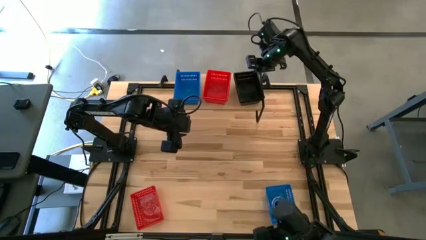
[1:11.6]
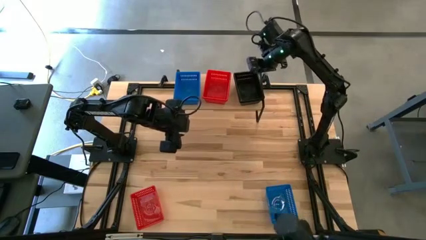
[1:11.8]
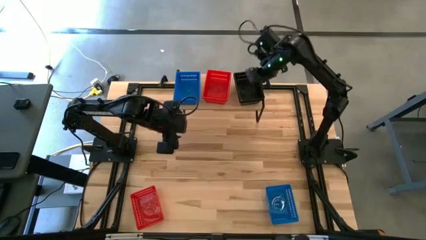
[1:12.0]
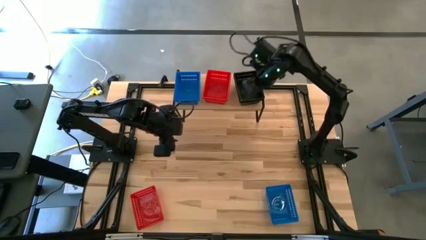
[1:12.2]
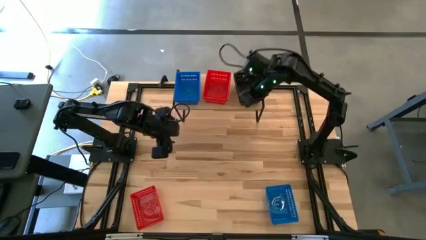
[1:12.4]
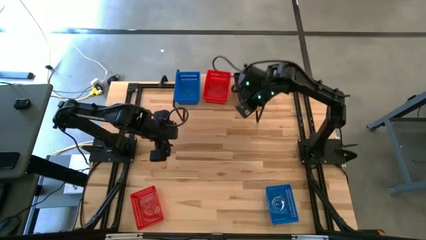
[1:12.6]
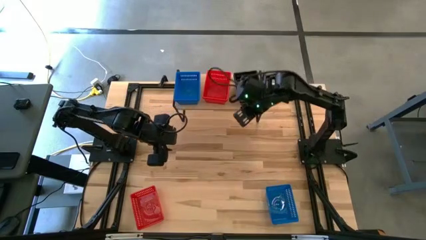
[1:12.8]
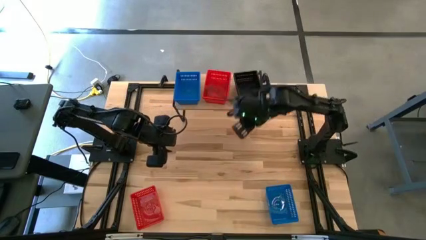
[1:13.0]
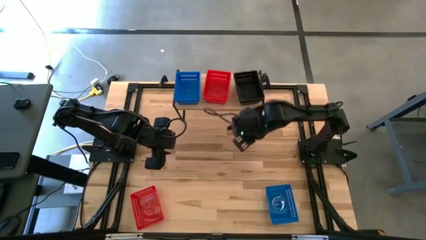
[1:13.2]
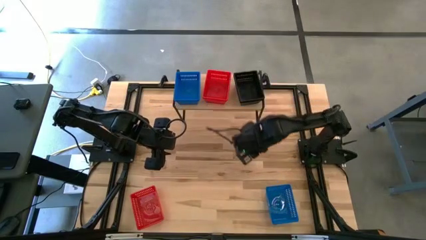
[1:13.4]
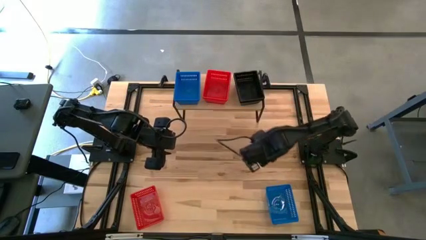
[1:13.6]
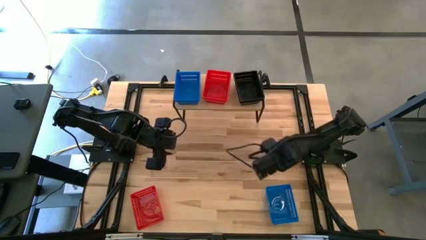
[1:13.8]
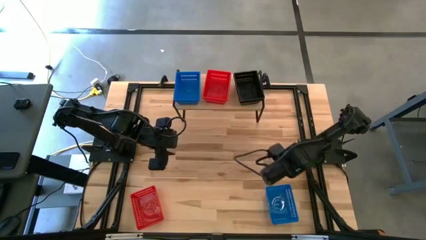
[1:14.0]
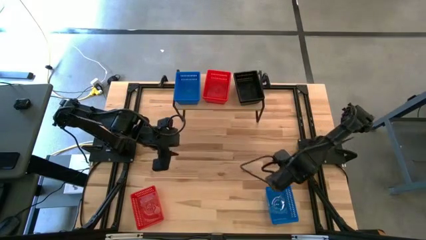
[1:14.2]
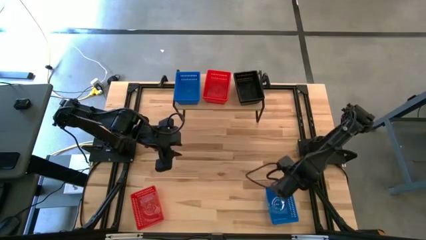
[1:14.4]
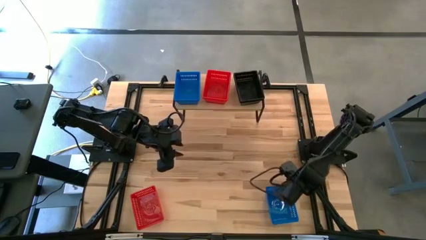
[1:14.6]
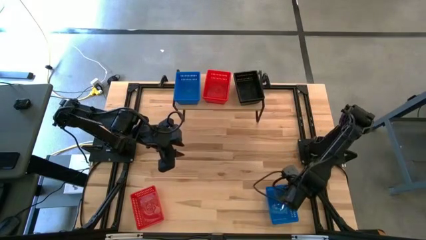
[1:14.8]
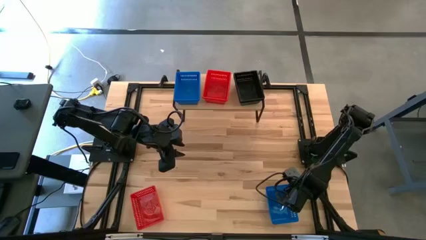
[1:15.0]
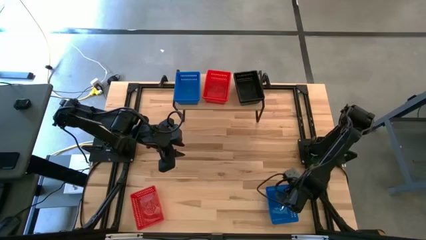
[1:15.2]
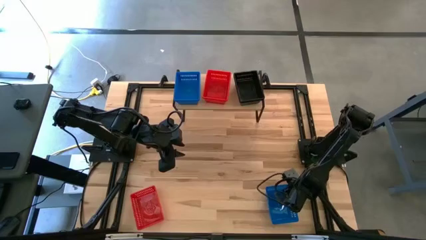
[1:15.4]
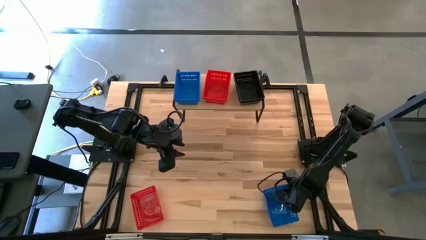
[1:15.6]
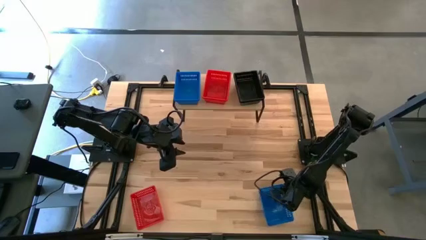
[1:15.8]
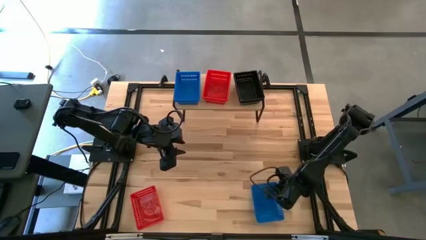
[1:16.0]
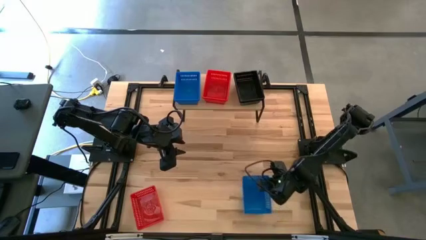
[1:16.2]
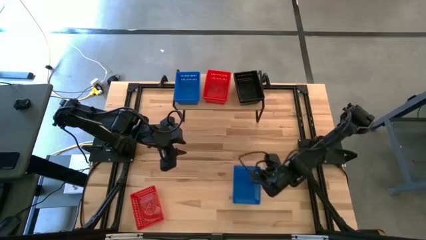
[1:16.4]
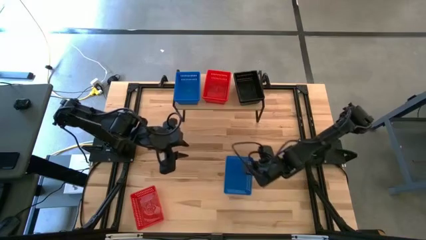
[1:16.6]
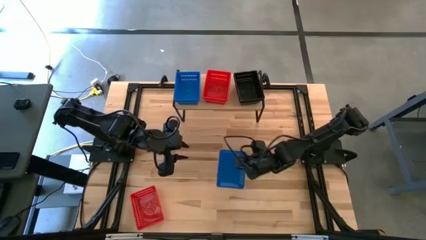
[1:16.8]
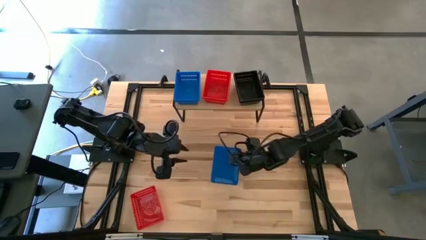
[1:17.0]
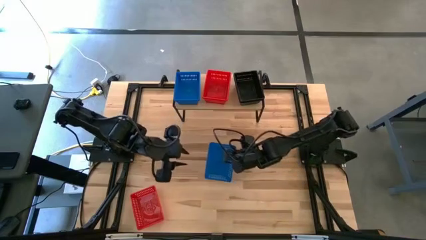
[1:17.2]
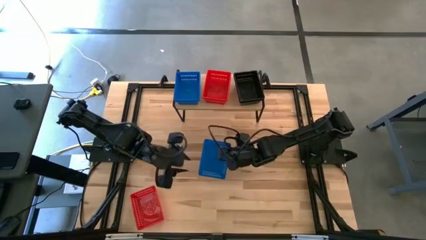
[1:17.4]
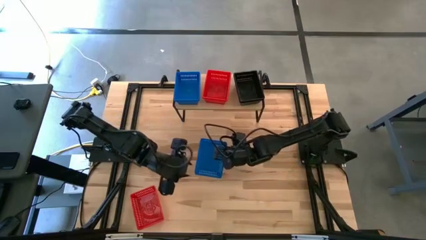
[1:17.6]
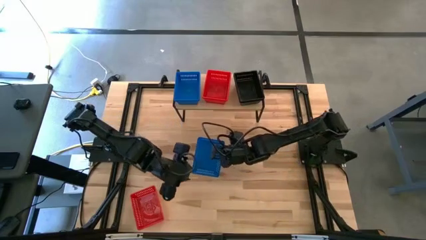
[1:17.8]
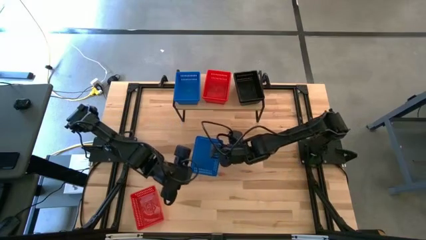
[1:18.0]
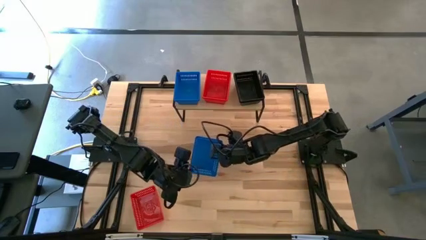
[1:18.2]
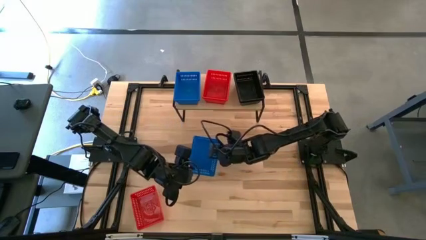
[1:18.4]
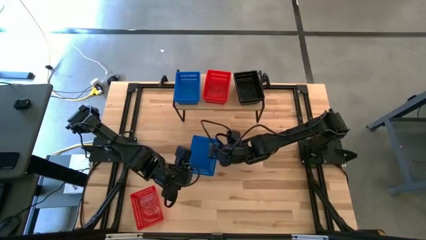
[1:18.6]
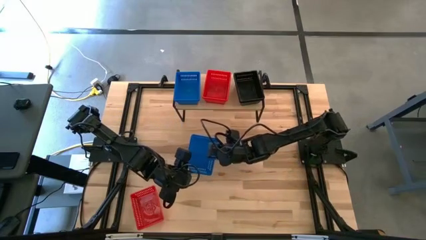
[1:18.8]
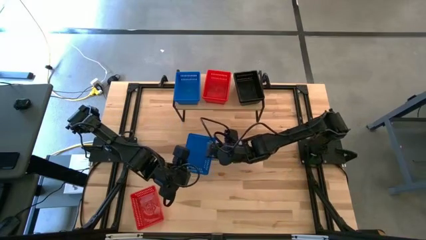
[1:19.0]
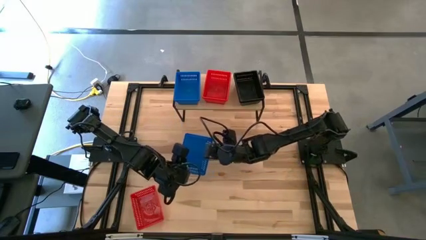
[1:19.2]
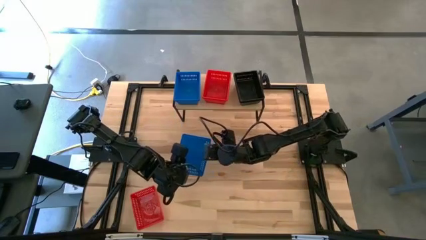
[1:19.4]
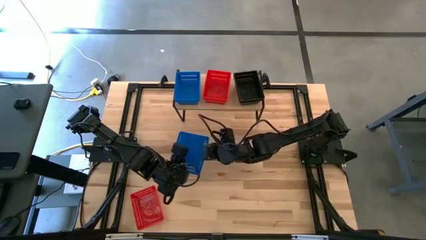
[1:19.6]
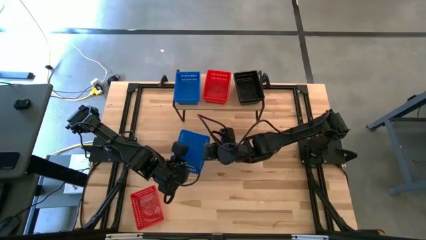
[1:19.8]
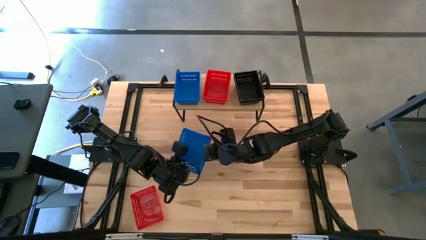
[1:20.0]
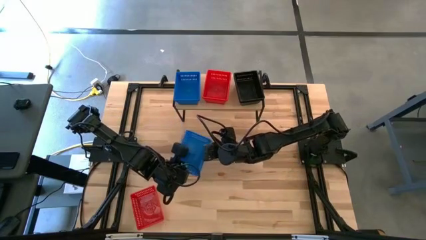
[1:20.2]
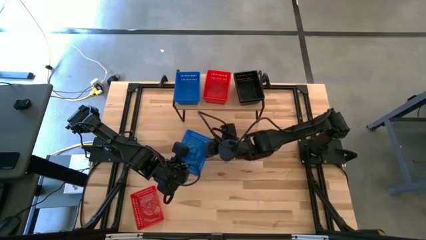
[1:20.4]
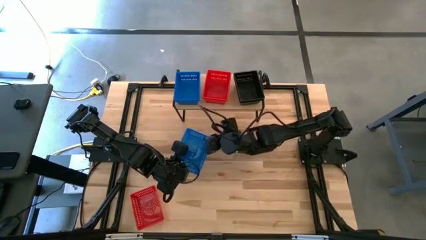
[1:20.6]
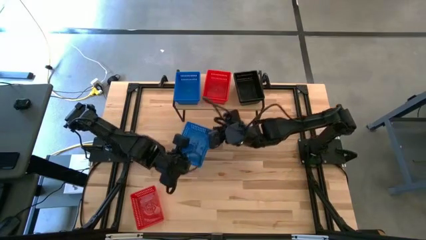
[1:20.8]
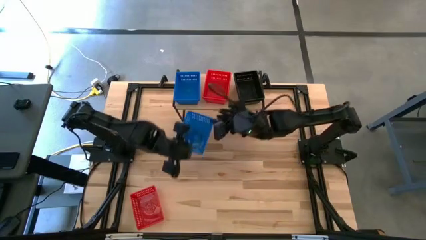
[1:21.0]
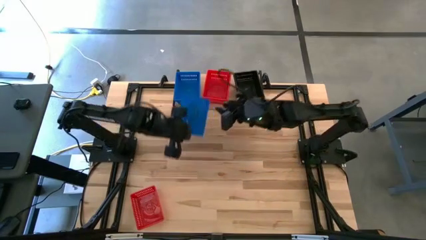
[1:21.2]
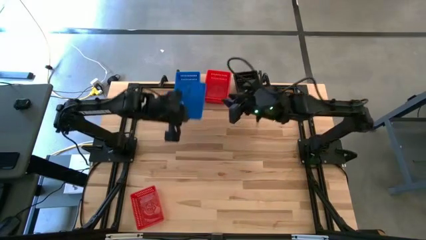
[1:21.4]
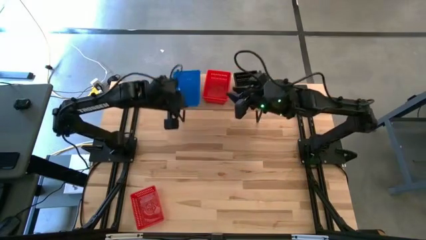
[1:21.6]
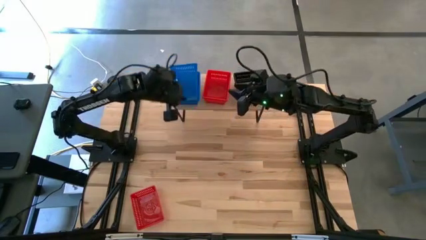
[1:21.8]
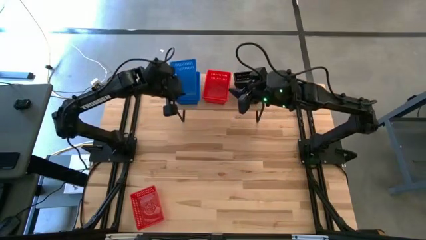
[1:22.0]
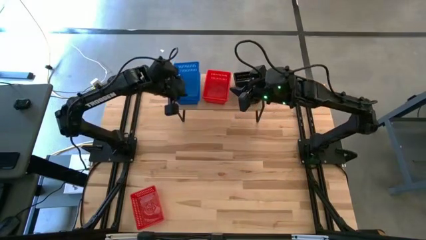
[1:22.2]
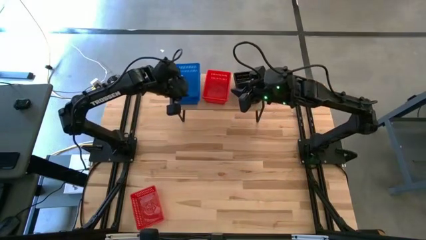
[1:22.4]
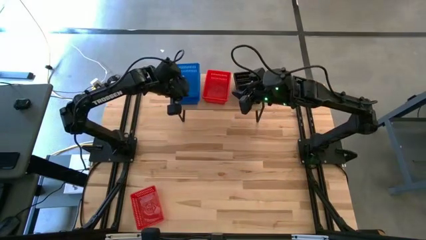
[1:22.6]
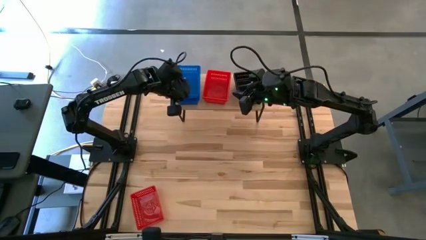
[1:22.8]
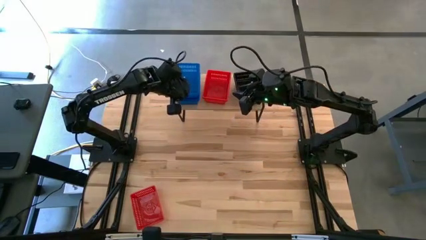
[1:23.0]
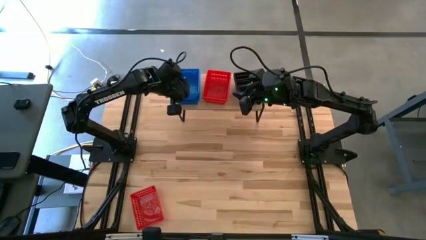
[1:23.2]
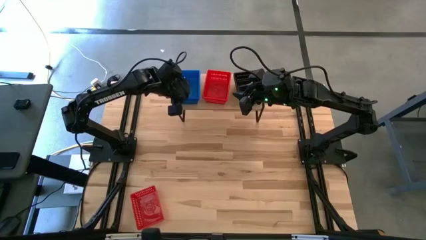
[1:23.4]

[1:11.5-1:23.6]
Task: Stack baskets on shelf by color
Stack the blue bin on top of the other blue bins on the shelf

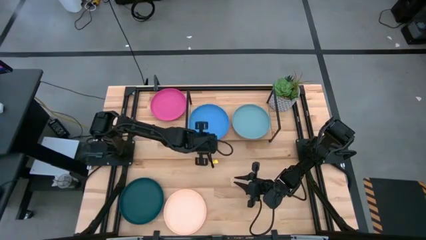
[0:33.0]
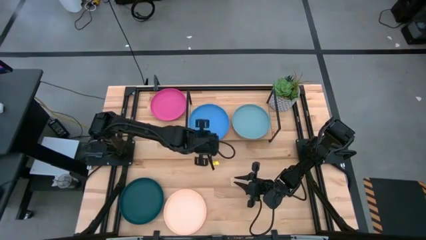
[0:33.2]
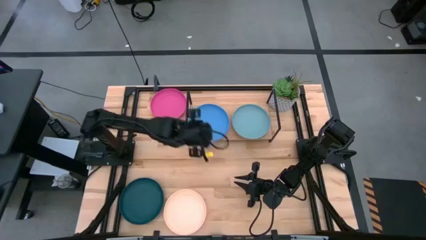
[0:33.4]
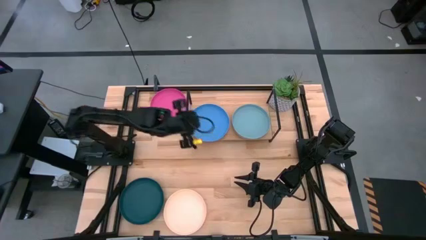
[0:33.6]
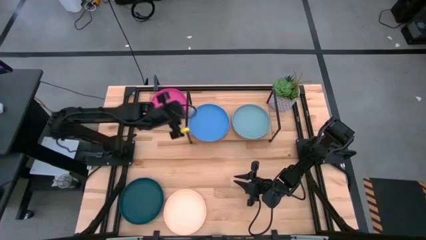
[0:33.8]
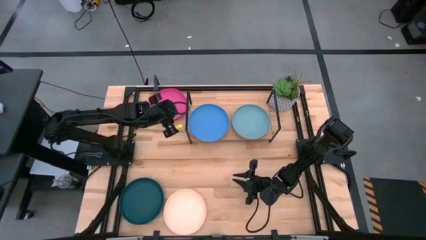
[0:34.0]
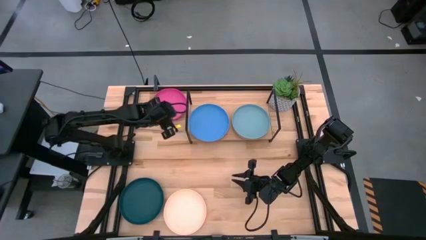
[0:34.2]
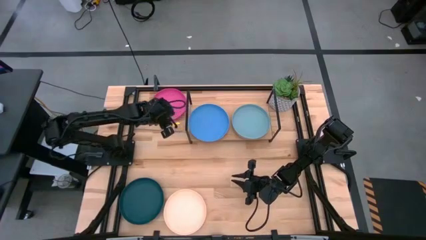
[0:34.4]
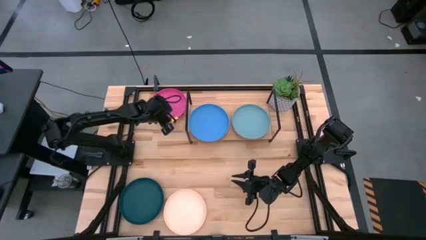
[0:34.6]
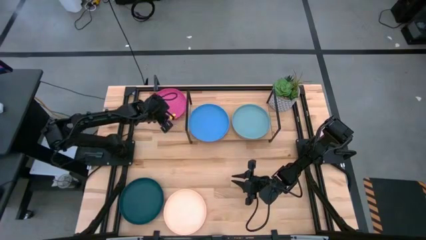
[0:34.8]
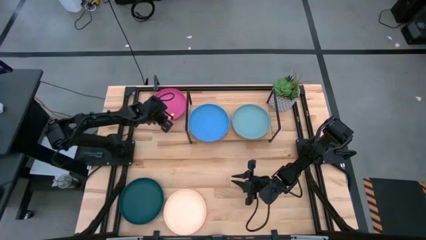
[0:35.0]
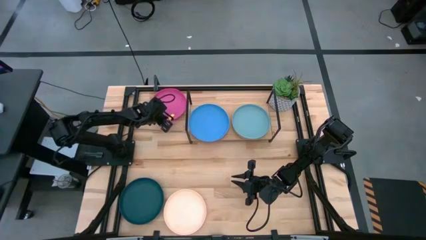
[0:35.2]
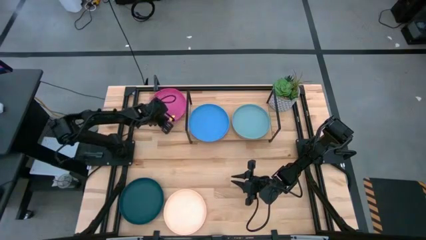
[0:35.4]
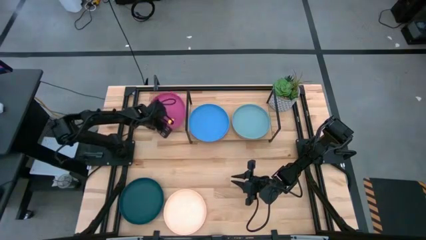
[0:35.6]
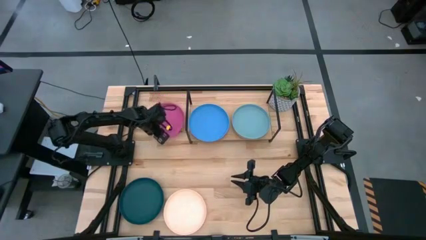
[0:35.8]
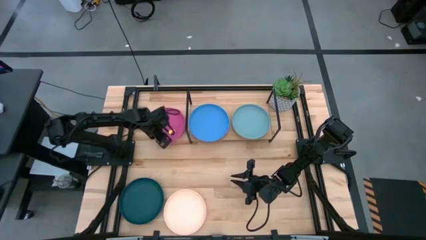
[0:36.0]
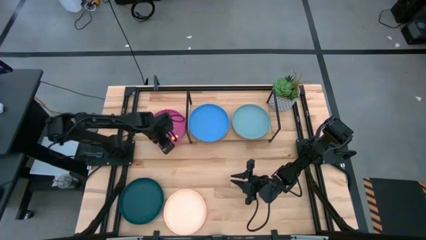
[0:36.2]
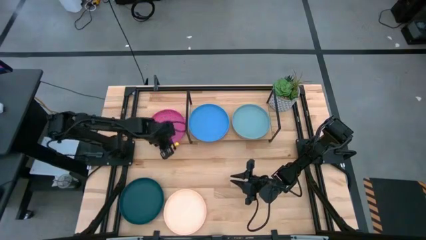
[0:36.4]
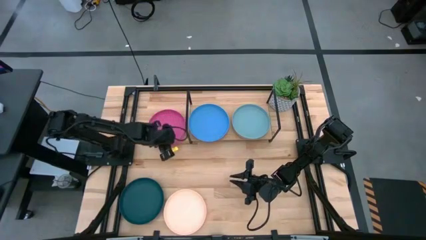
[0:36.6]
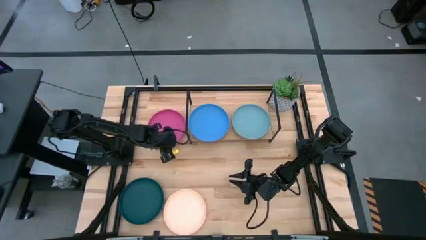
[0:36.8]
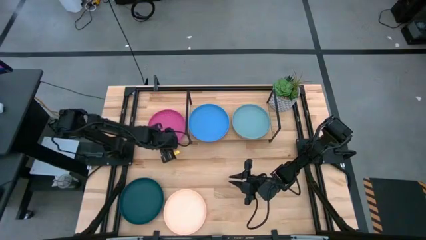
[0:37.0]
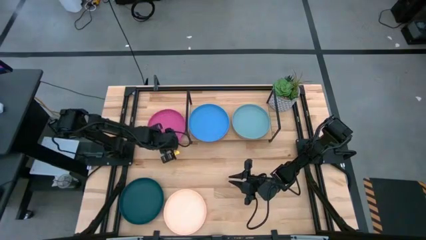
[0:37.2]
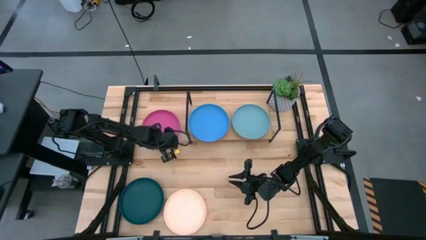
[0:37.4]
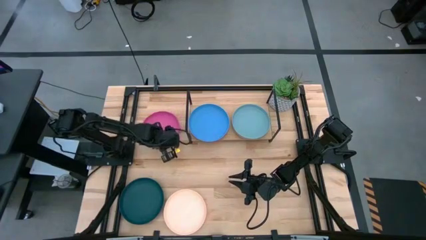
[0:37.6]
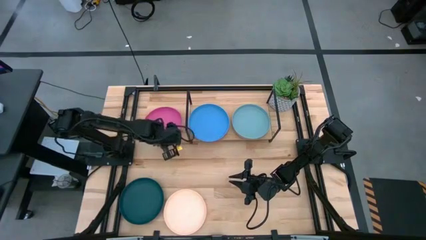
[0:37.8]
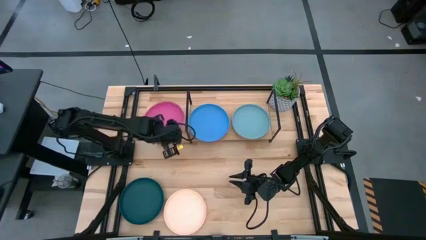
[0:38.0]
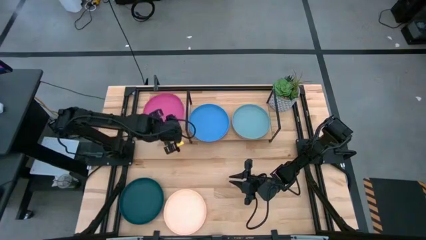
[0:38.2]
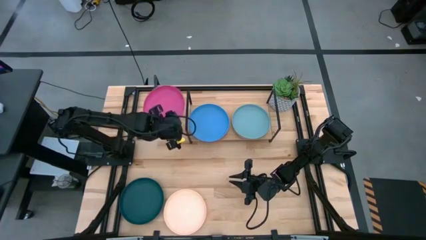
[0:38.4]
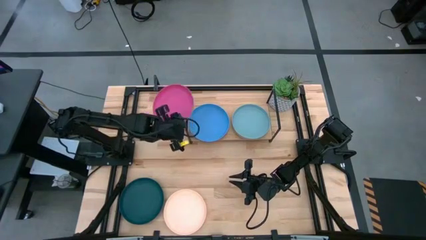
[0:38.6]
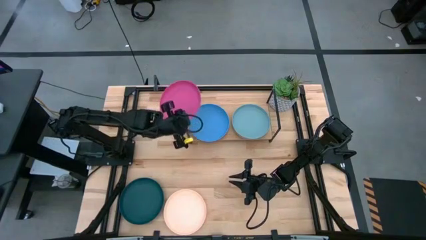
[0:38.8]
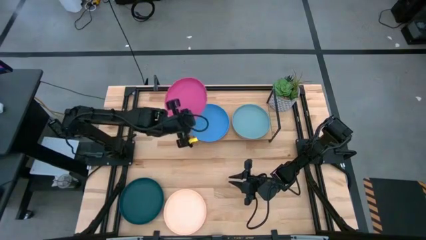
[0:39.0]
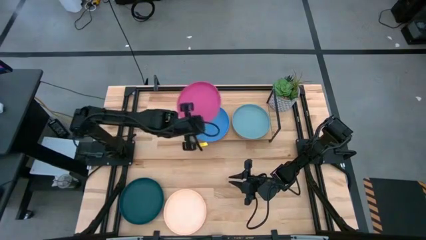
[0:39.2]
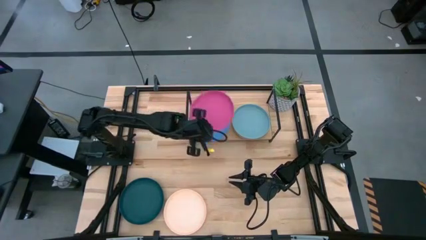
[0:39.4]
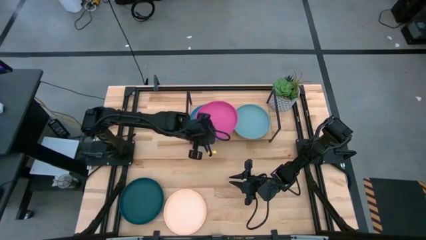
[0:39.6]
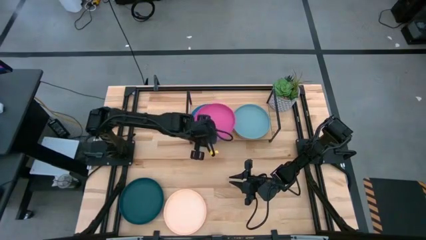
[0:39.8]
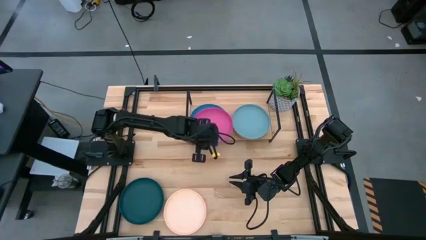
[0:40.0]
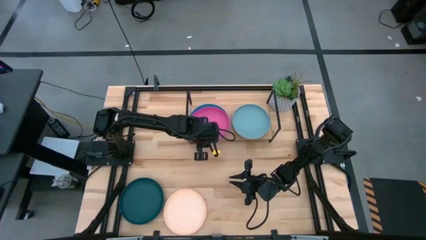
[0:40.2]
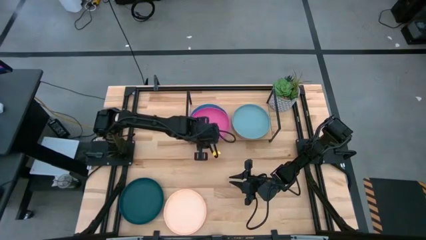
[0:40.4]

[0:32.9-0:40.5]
Task: Place and stack plates onto a shelf
Stack the pink plate on top of the blue plate on the shelf
